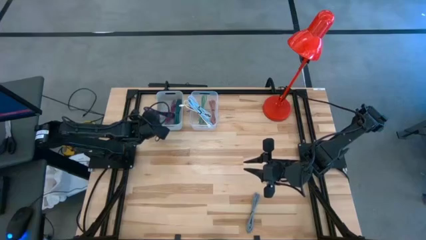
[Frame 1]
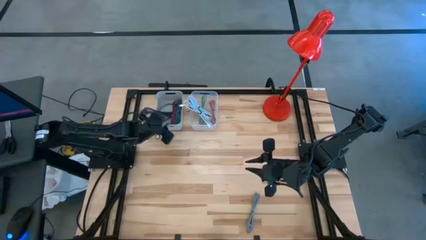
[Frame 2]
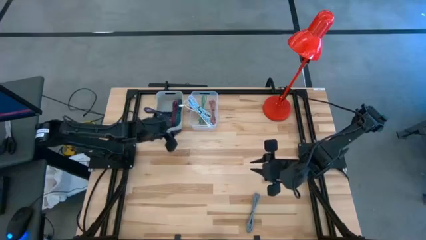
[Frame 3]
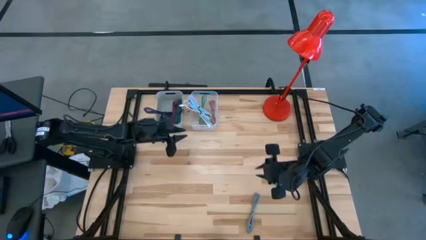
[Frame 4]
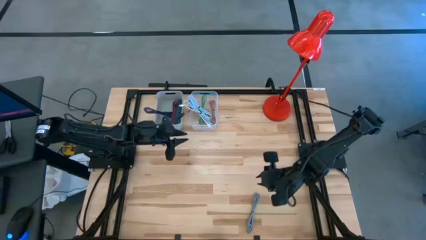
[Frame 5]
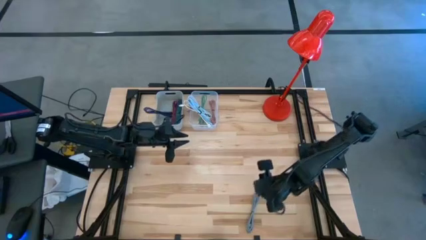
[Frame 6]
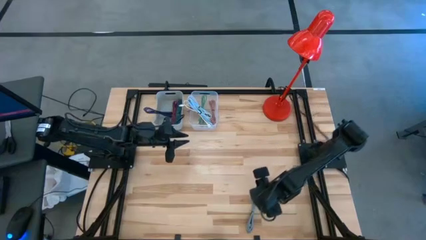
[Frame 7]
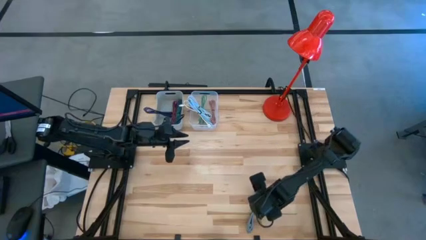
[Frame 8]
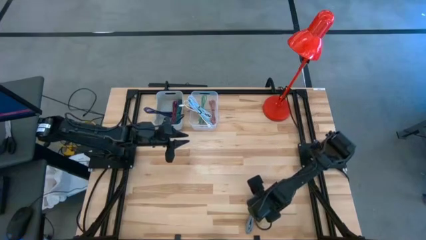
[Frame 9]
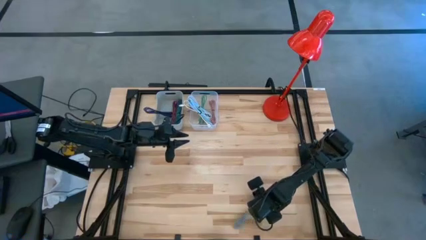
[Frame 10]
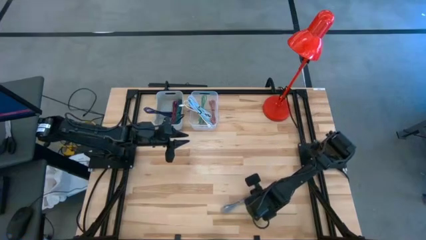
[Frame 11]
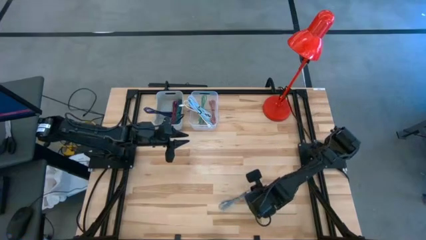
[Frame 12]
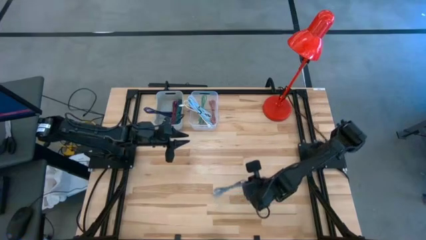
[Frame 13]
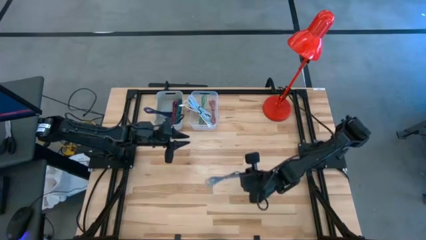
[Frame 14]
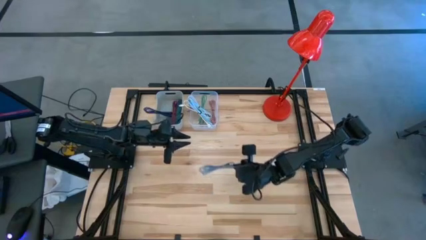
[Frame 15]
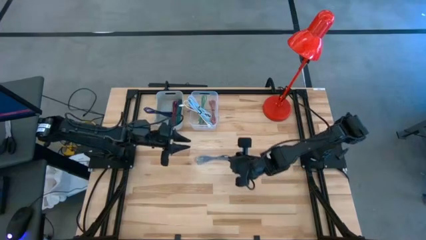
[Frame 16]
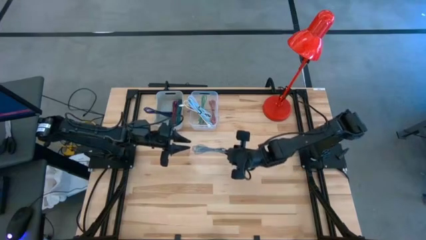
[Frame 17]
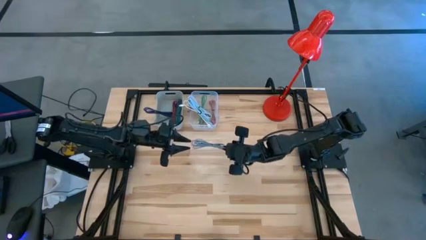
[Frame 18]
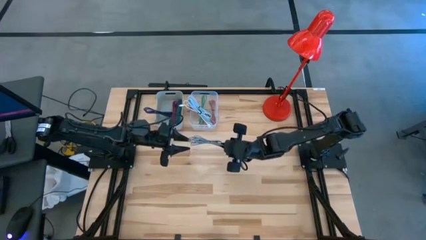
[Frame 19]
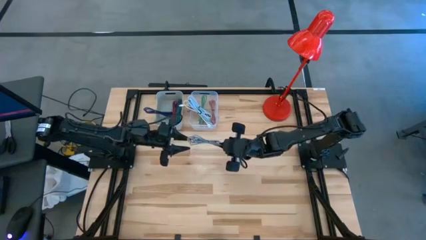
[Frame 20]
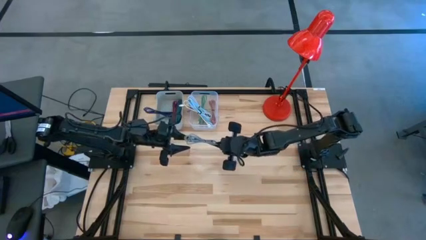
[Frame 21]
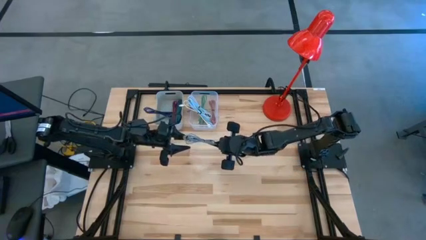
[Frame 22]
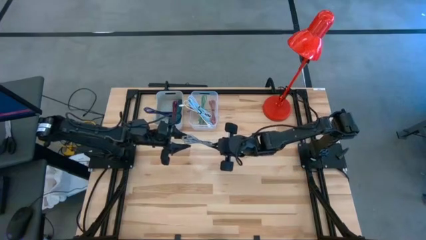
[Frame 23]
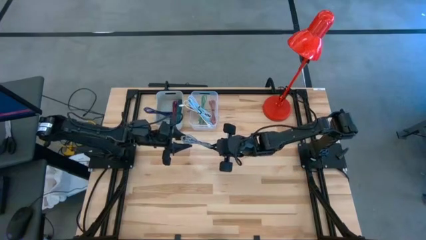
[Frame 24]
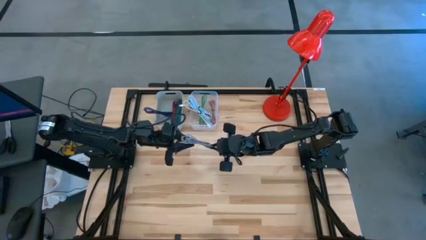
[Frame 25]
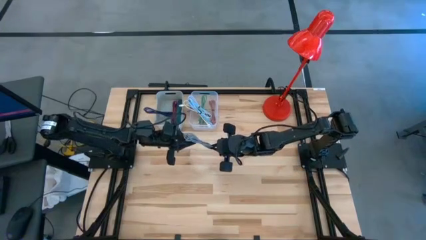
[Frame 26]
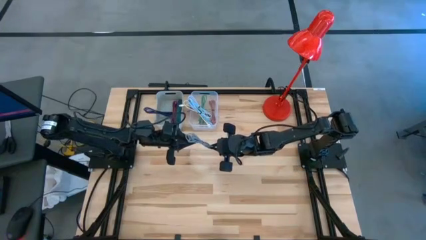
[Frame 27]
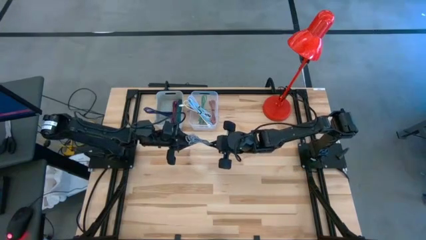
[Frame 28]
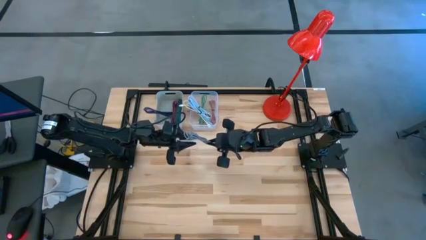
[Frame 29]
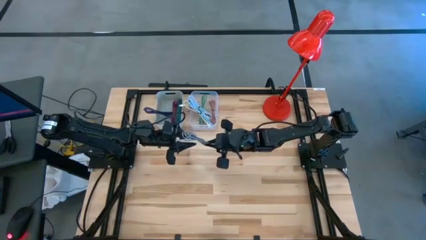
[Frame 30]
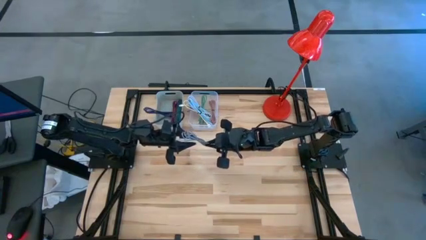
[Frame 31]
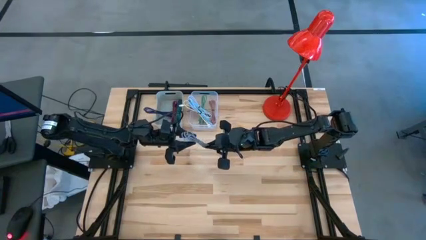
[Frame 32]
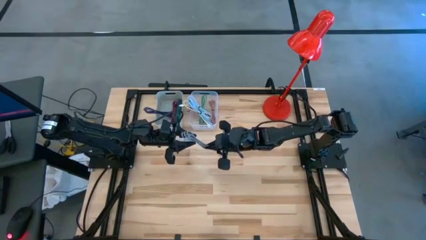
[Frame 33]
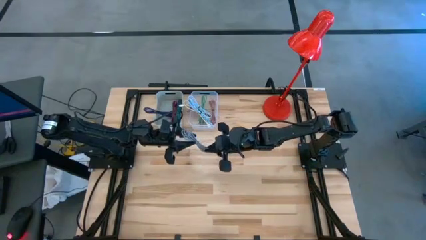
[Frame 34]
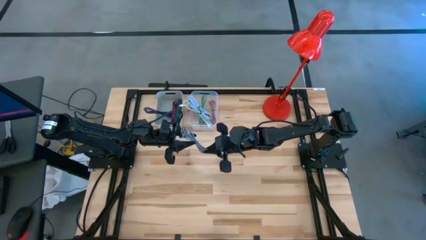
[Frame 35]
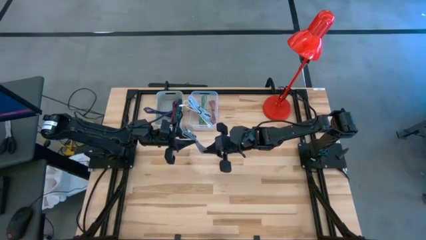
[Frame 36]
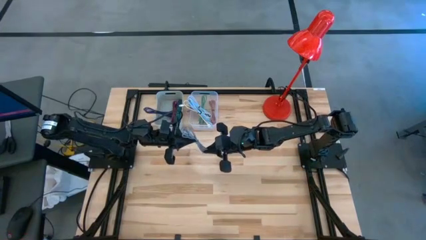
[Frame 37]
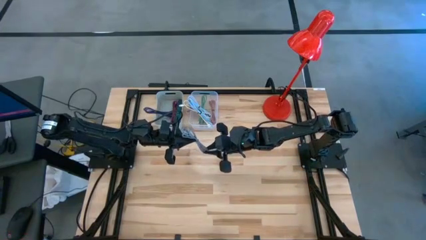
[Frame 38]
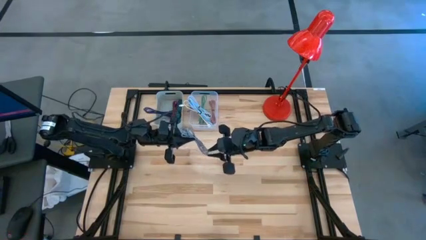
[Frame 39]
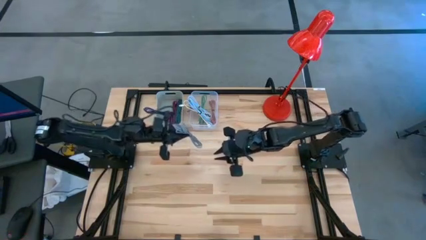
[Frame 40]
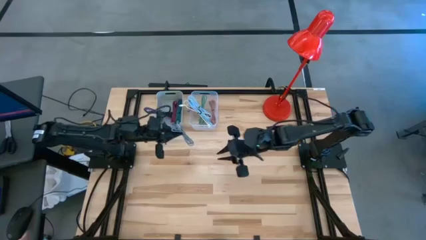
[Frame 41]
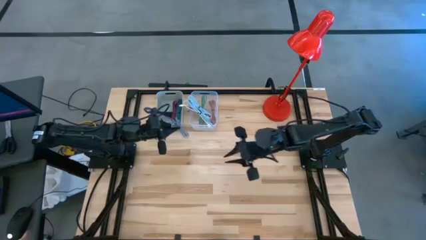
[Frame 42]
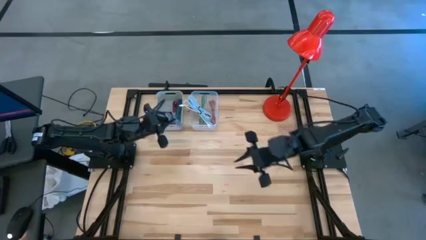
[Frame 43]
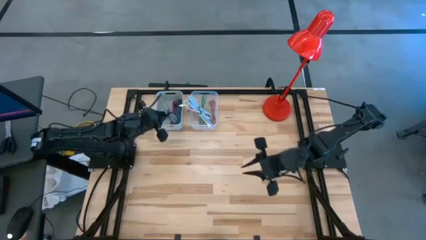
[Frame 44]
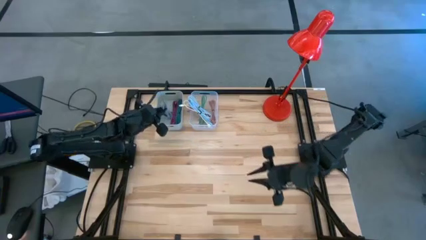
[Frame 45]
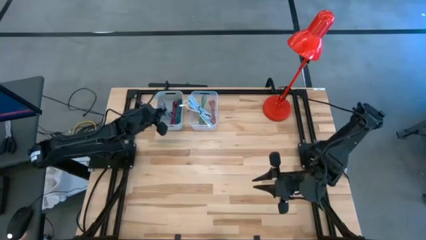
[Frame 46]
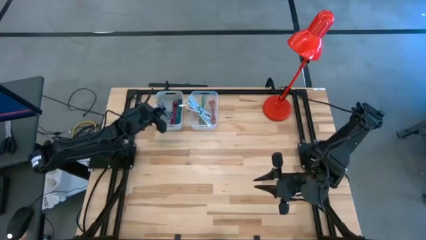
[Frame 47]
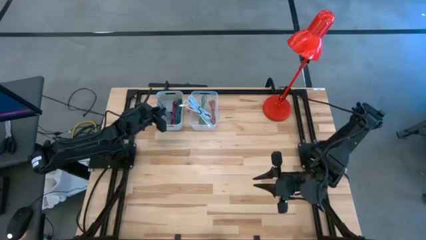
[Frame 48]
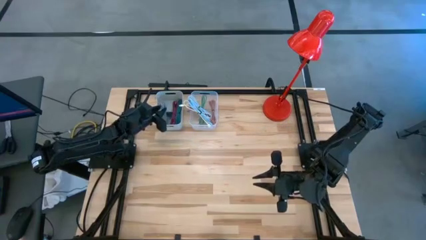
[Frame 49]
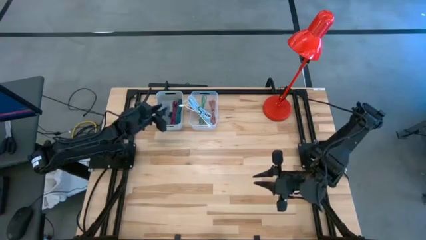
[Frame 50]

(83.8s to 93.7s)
Task: Pick & Place USB Port
Put the black and white charge cable into the gray bin

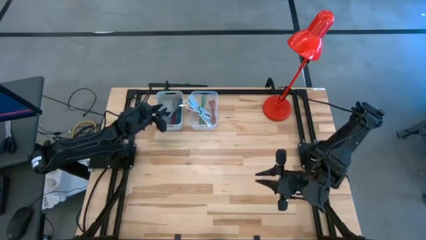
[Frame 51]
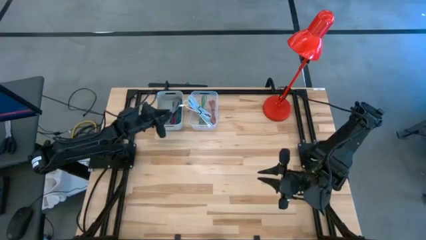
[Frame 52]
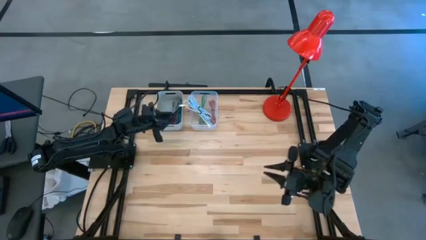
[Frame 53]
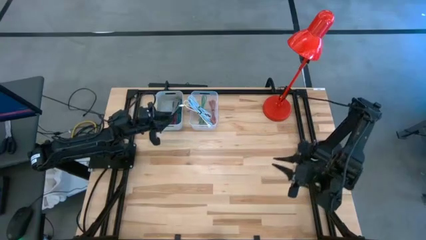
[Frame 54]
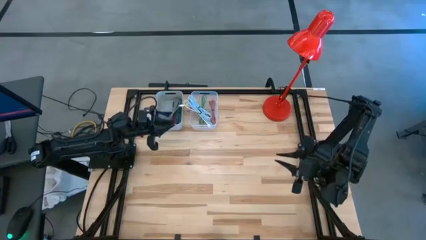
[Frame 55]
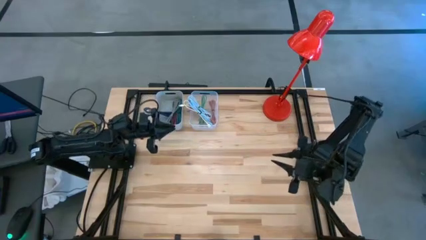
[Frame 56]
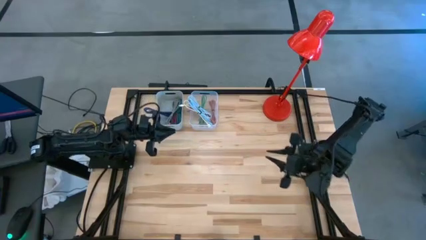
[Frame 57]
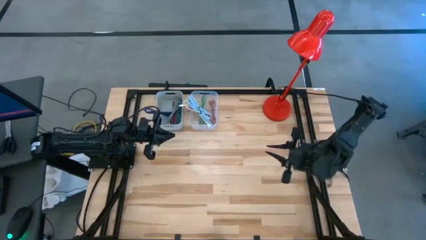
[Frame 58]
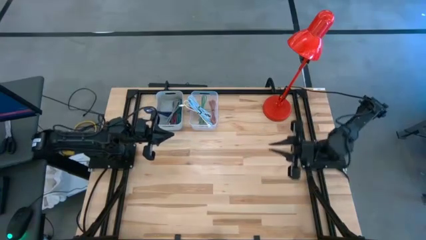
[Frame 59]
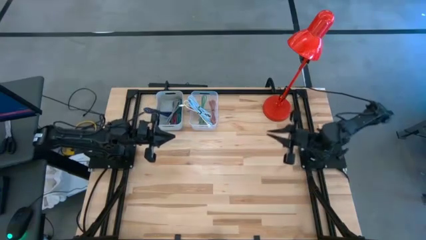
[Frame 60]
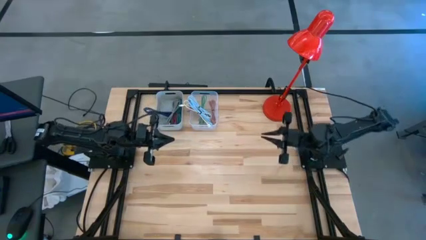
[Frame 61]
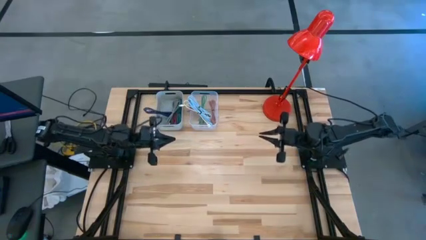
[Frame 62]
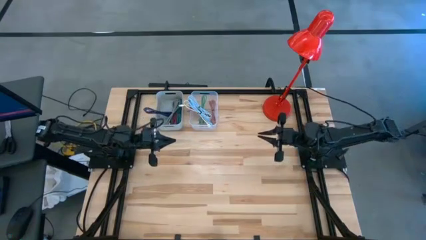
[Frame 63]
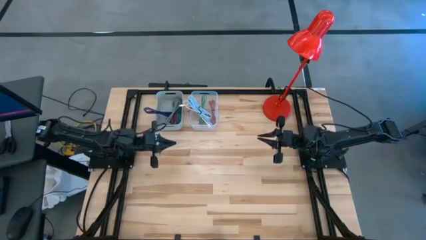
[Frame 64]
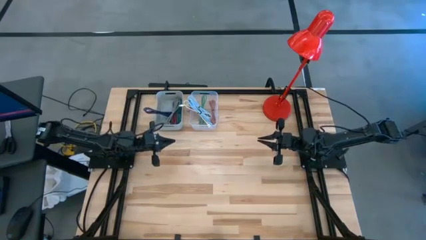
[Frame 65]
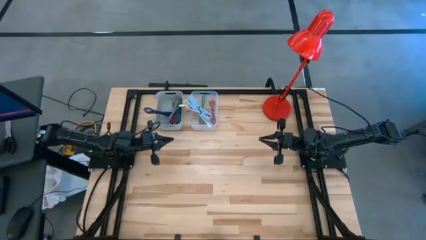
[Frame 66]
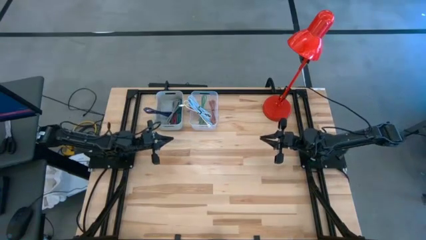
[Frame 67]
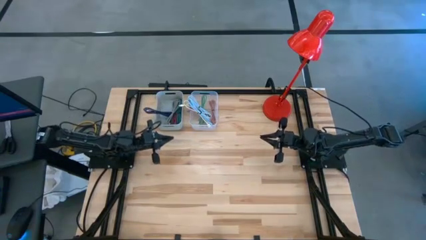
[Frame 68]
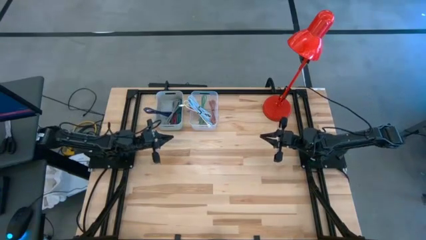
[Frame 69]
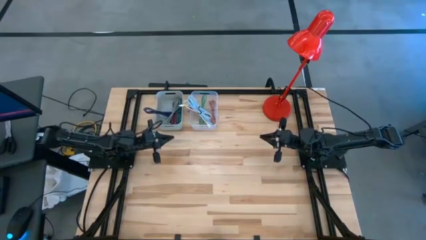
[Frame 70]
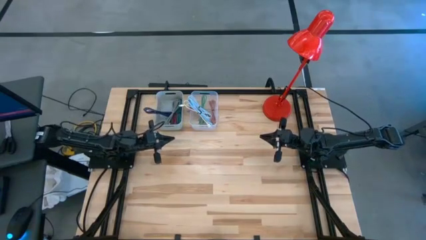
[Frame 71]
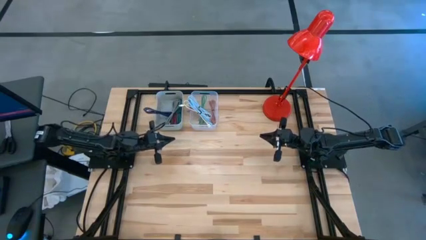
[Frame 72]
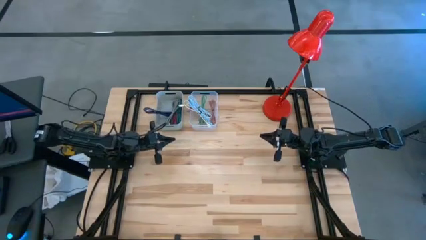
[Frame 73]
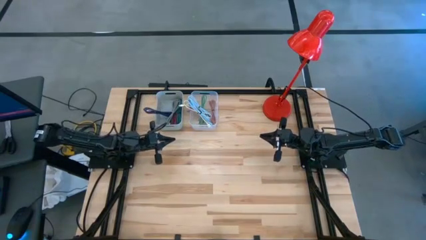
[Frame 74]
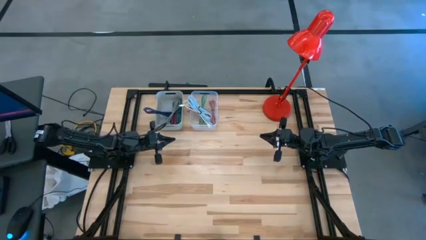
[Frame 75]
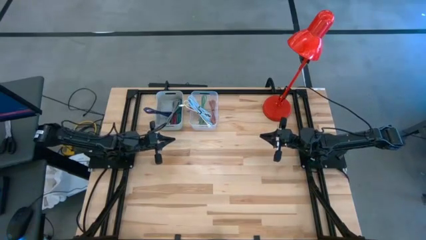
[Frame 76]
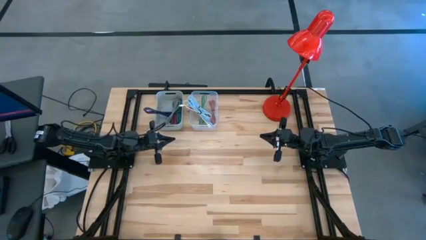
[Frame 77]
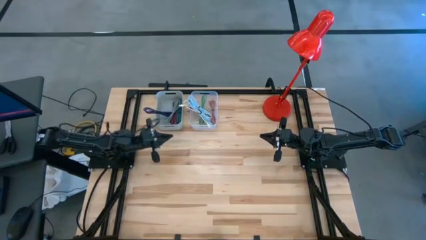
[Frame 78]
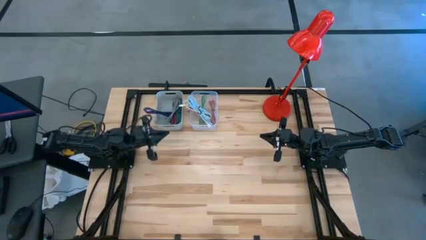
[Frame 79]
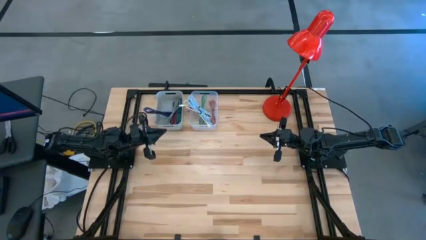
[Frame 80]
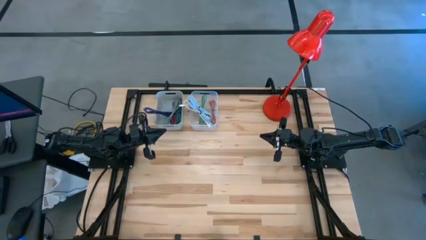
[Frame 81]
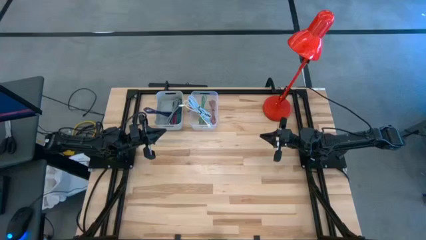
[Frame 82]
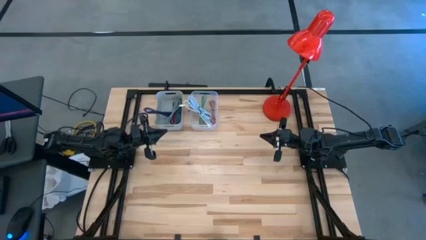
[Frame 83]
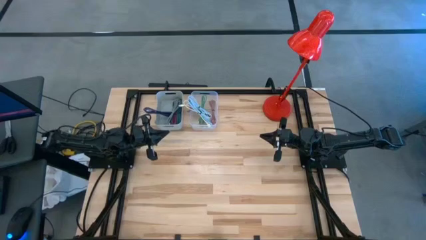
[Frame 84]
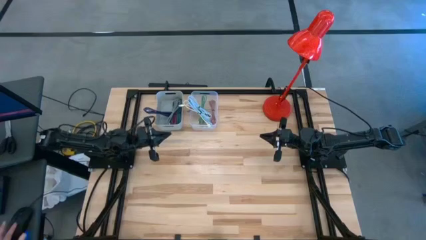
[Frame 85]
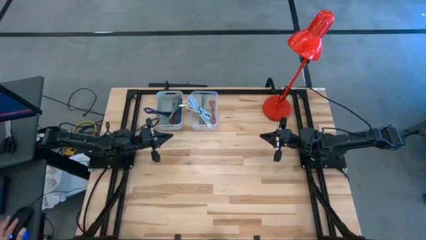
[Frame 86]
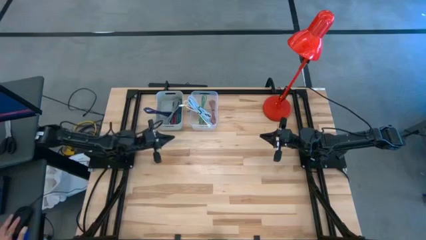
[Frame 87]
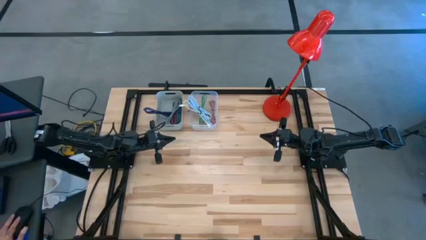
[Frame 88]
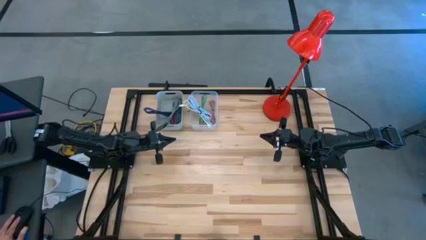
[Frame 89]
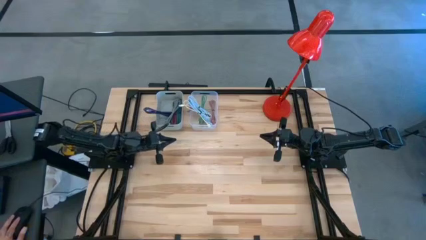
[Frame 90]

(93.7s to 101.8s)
Return to Home Position
